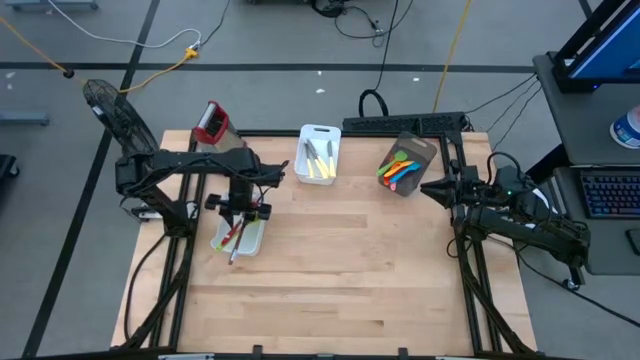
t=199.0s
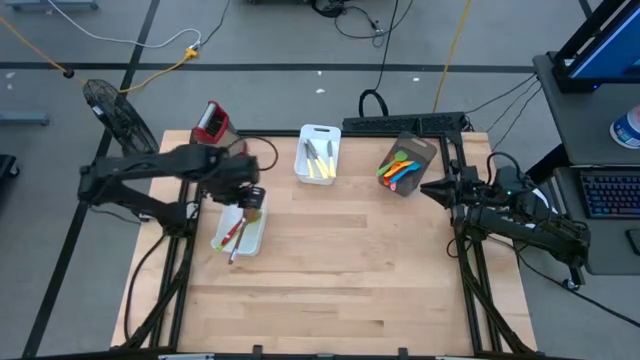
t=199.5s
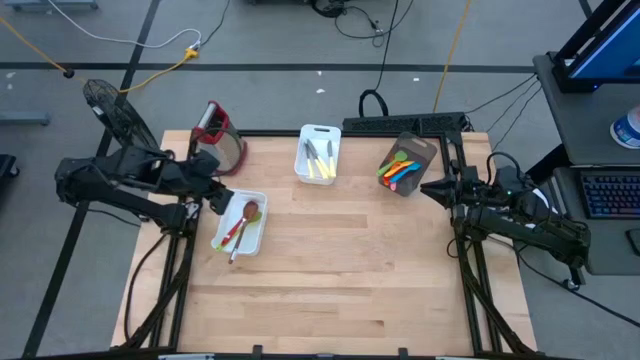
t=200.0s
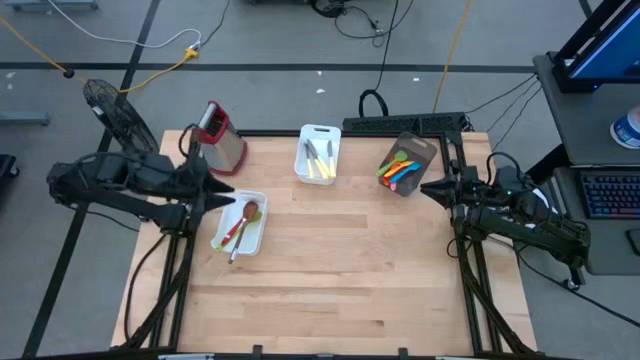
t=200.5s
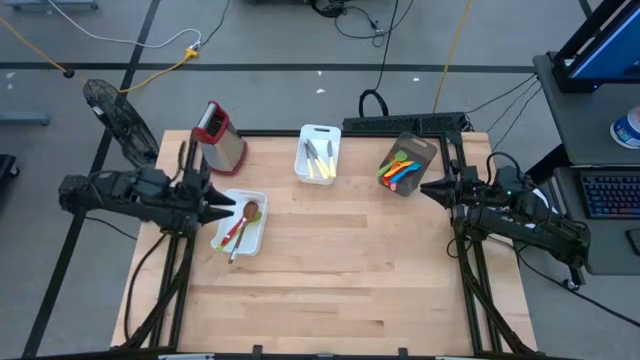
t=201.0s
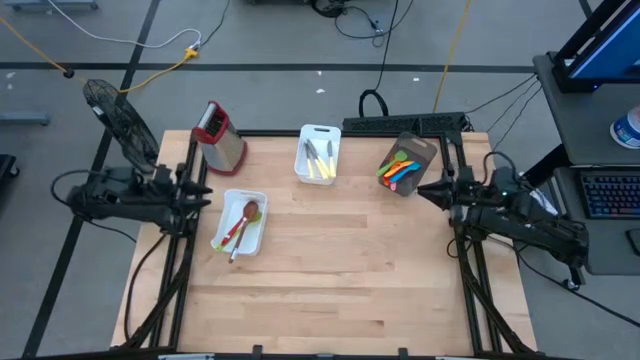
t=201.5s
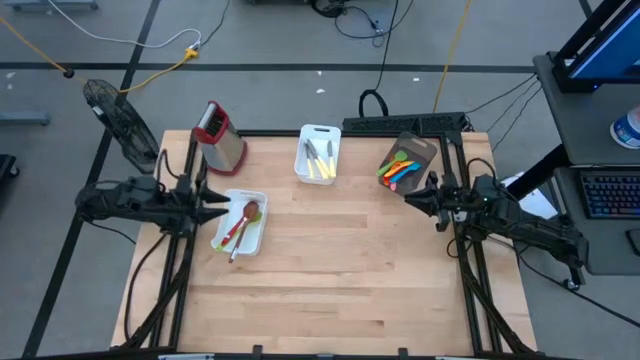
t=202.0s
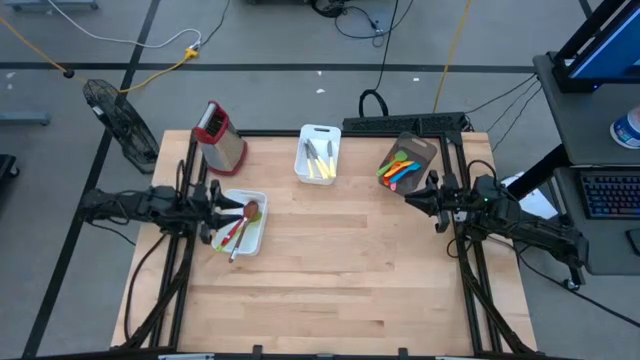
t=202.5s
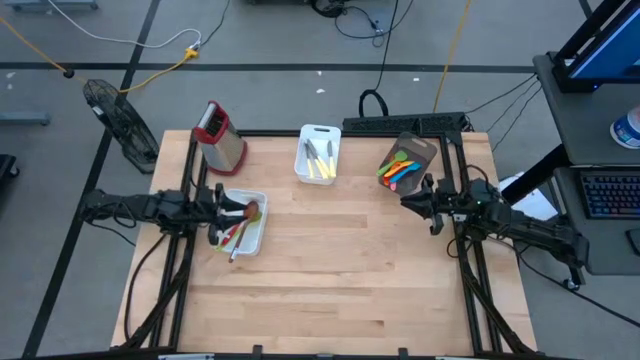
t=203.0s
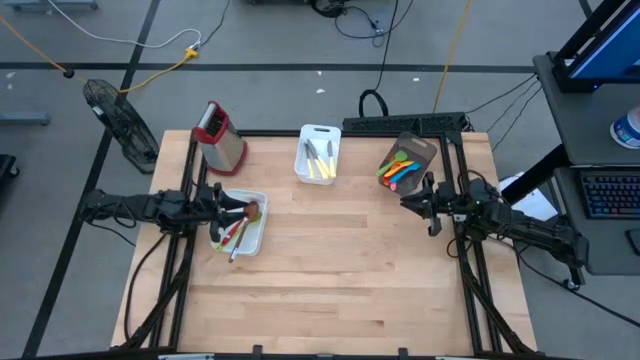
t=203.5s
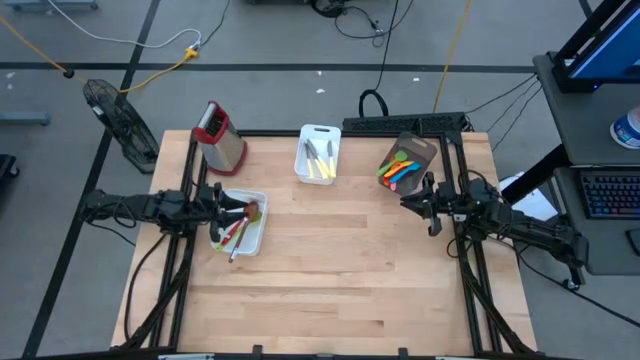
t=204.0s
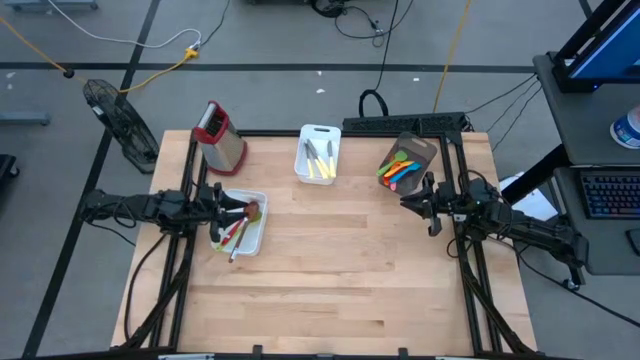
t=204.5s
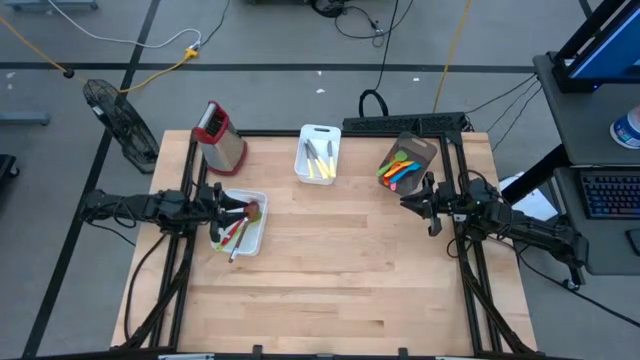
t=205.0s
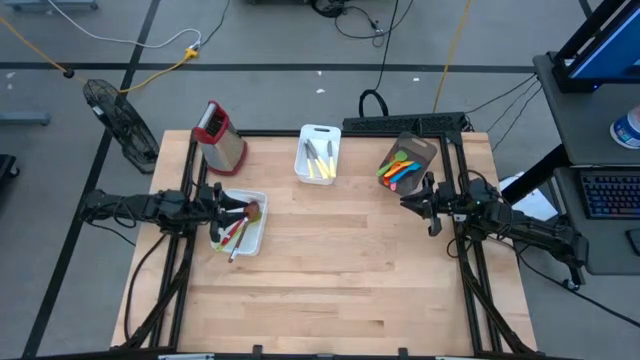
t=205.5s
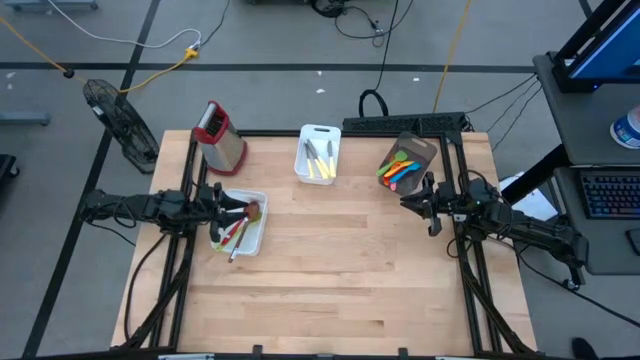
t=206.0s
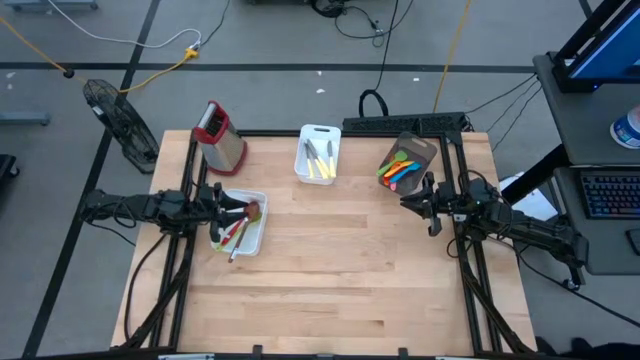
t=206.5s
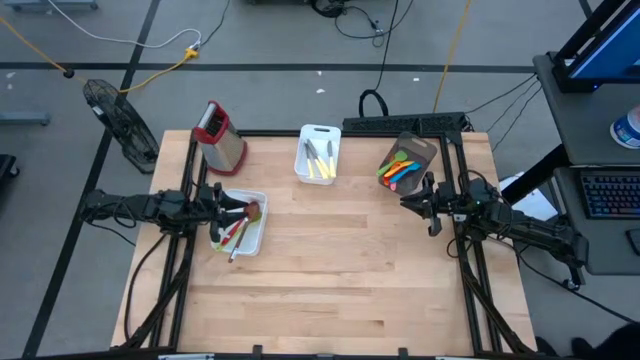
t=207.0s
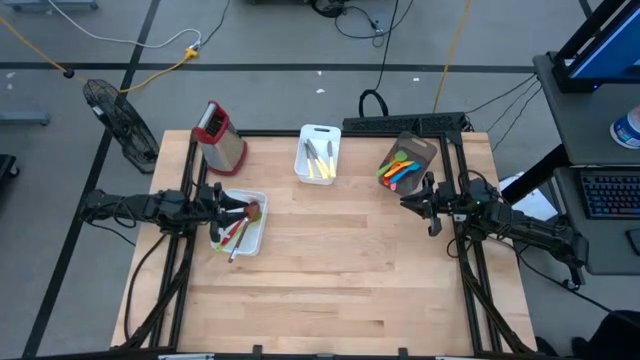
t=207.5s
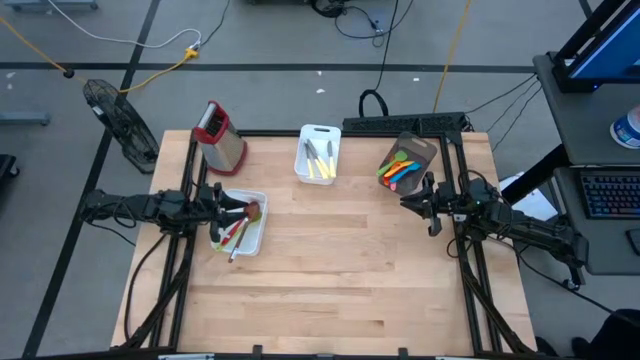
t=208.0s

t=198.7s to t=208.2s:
Task: Pick & Place Kitchen Items
Return to Home Position

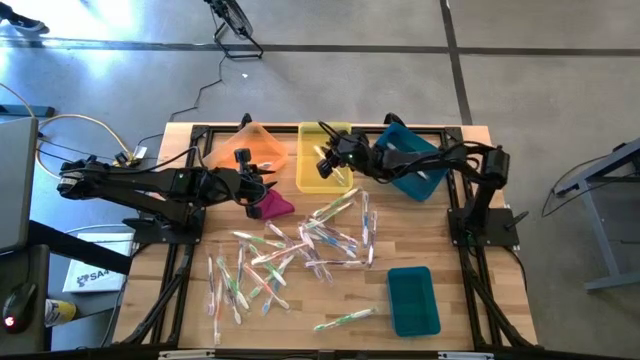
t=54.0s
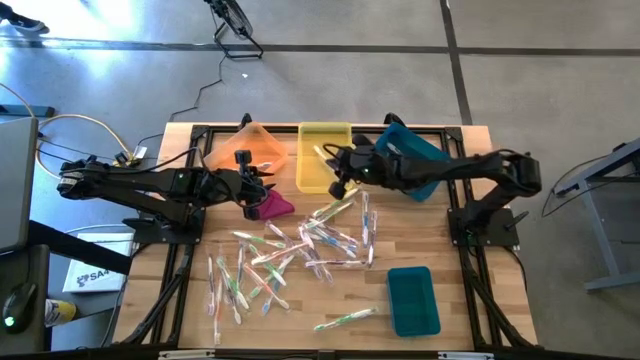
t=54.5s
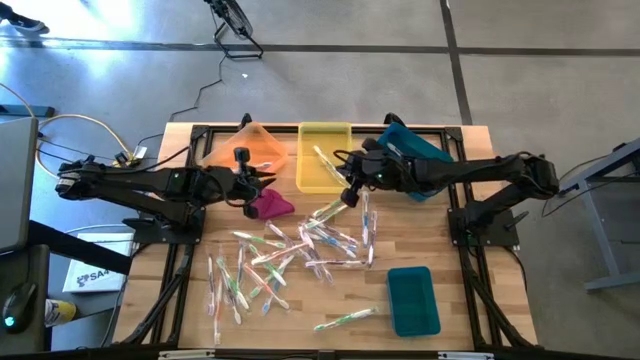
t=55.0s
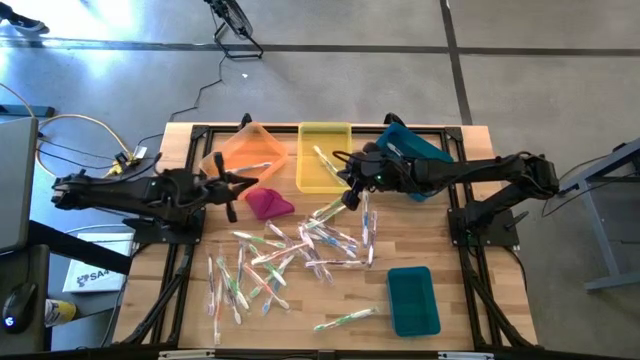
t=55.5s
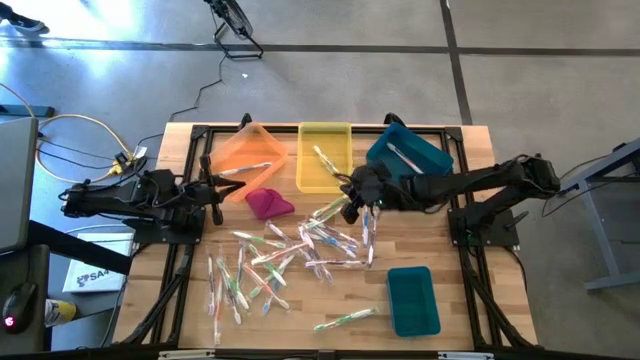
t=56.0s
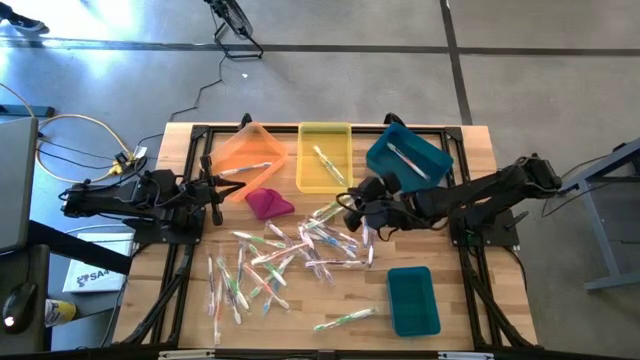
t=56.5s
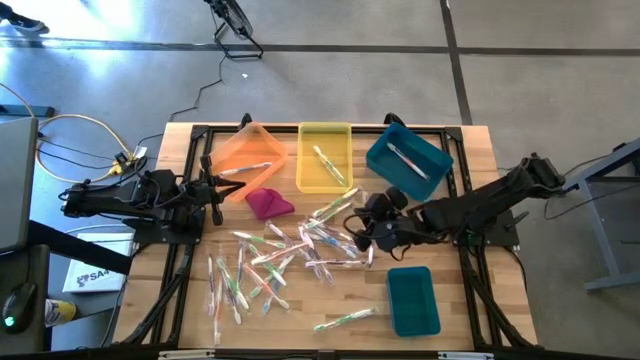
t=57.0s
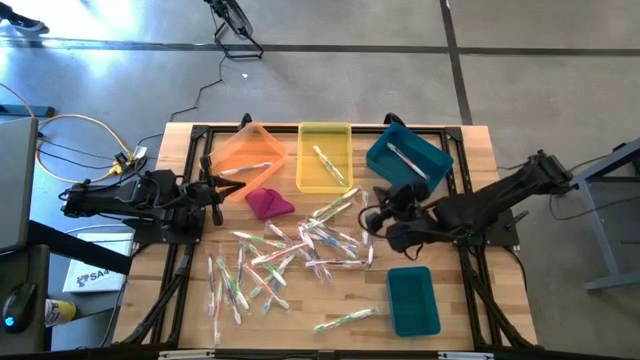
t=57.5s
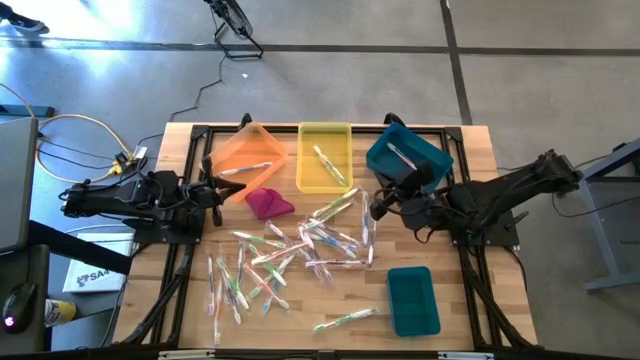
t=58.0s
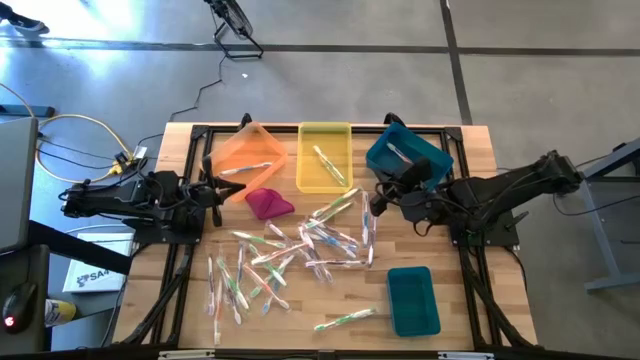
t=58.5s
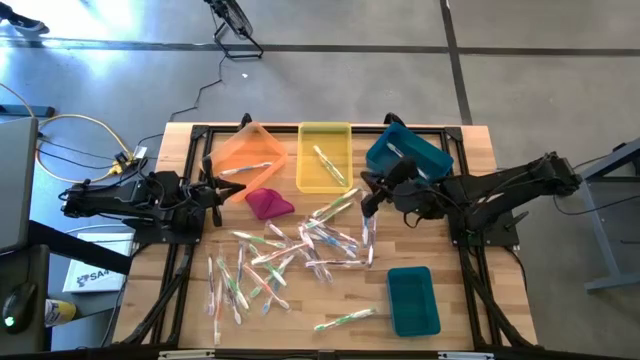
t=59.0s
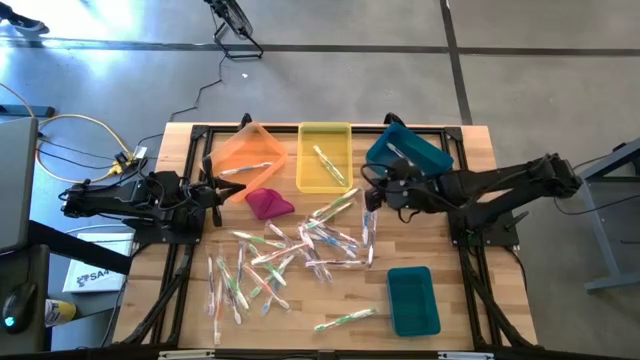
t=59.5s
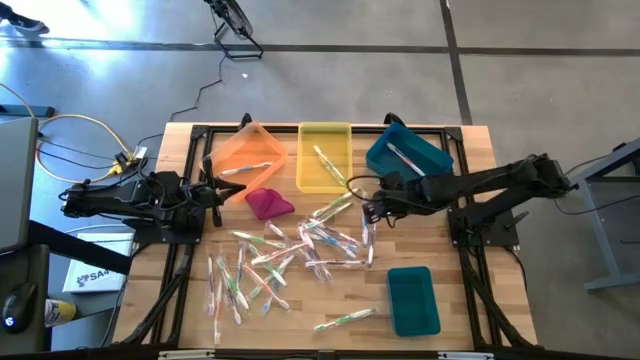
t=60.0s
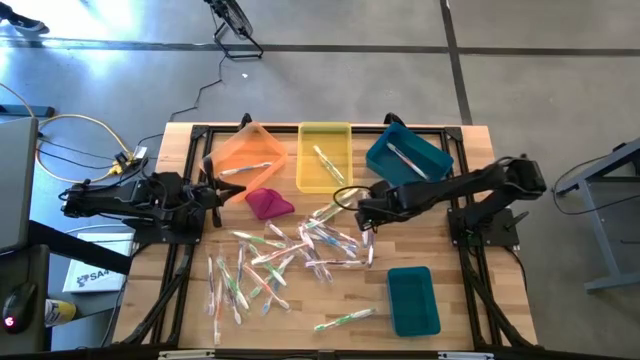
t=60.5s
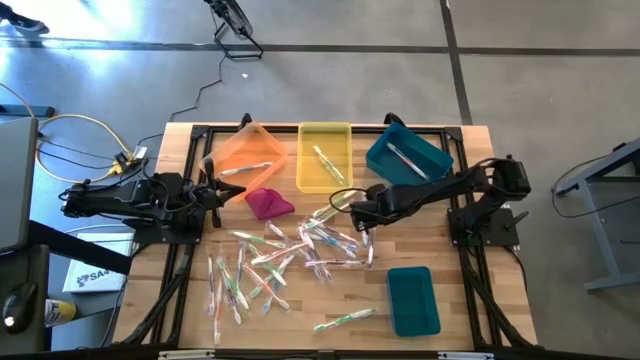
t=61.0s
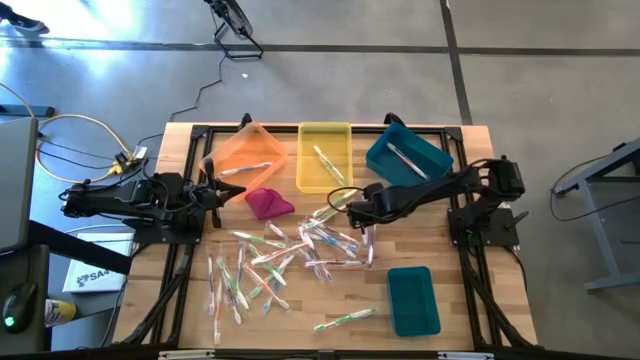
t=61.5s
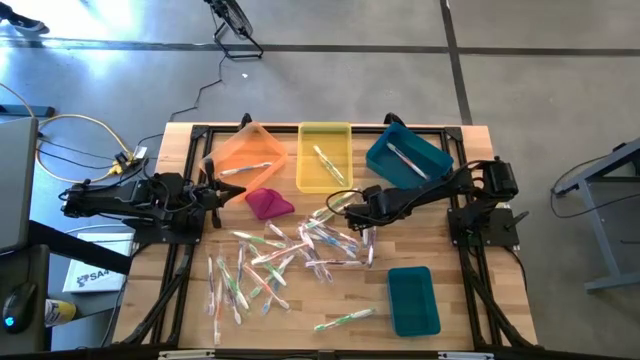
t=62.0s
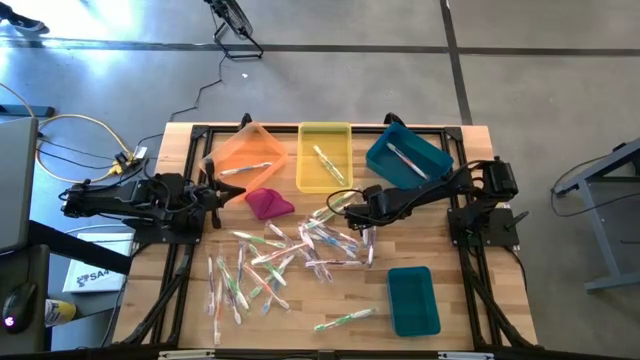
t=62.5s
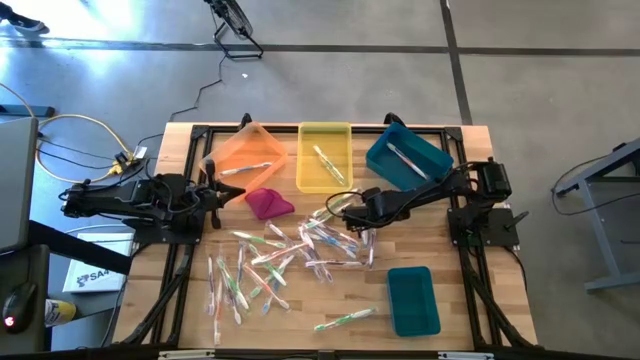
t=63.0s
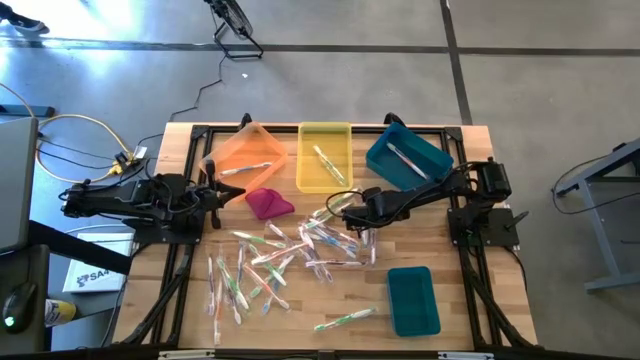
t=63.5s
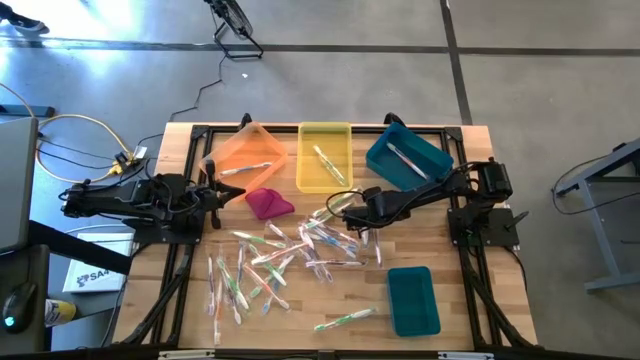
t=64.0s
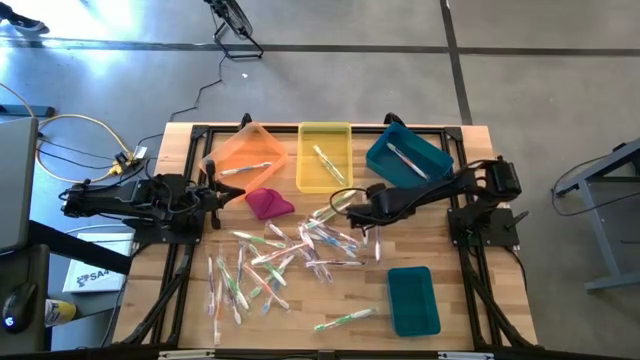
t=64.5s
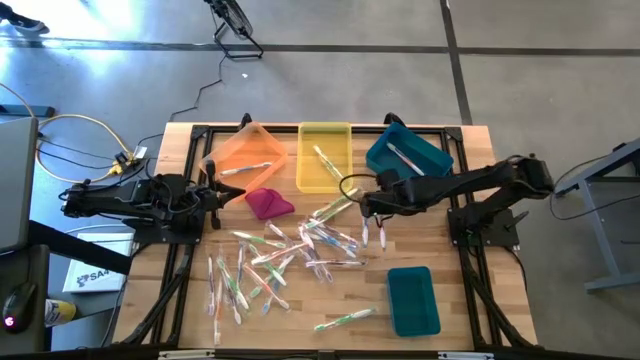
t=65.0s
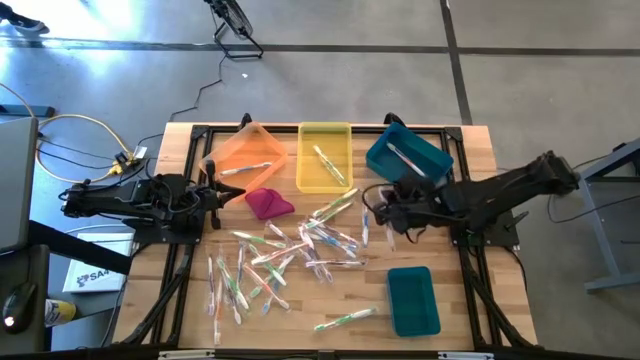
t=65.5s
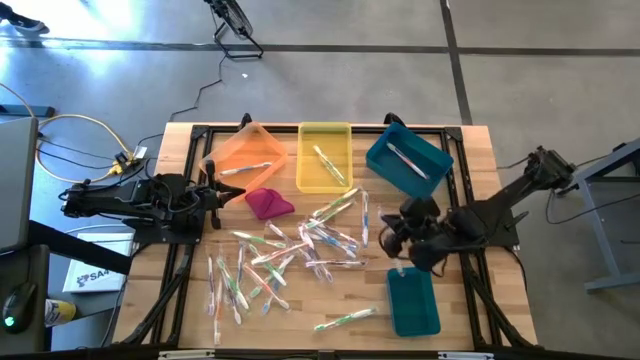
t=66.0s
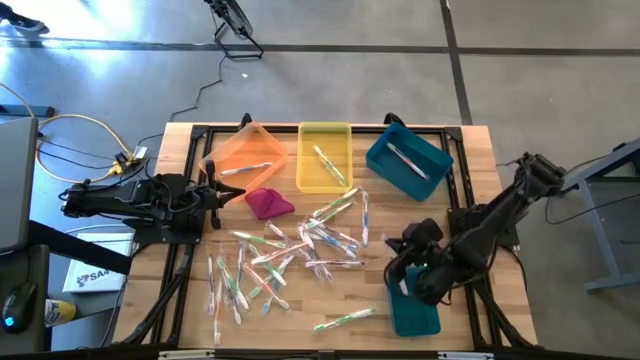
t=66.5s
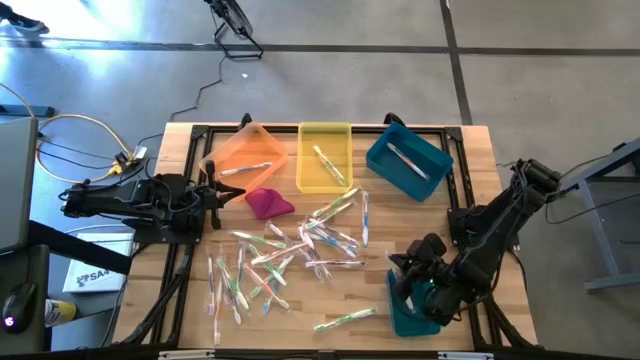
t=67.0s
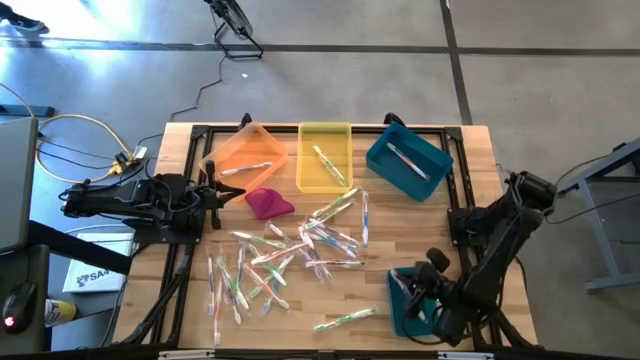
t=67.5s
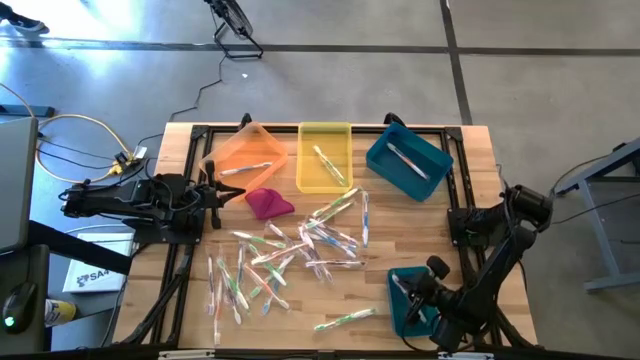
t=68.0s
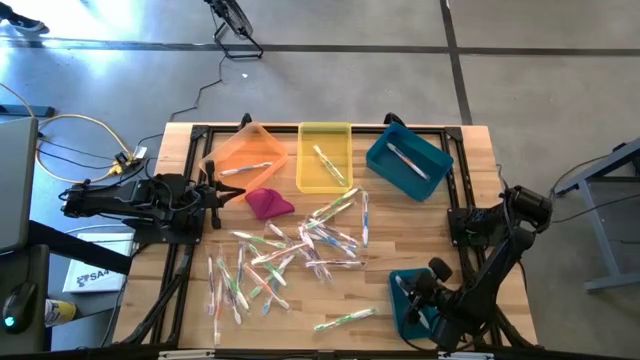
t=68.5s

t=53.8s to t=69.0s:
Task: Pick & Place Toothbrushes
Put the purple toothbrush into the bottom blue bin
